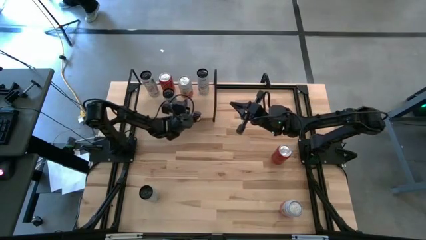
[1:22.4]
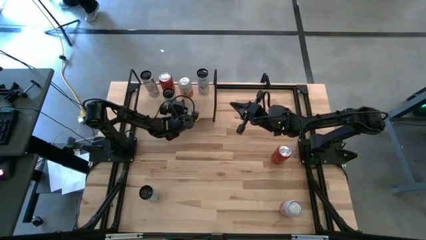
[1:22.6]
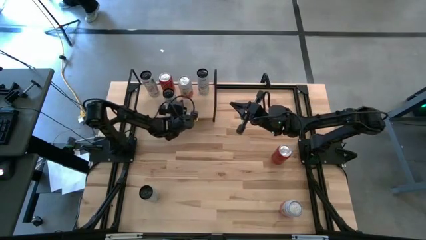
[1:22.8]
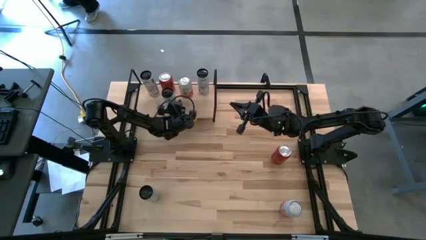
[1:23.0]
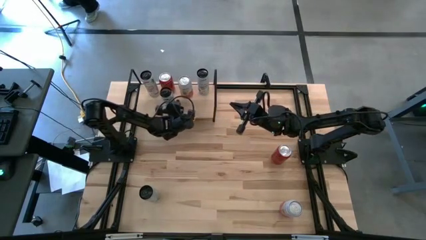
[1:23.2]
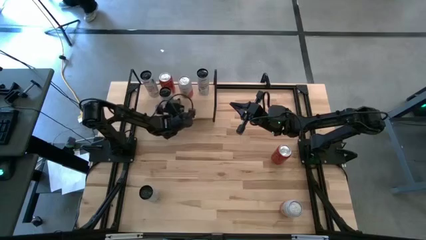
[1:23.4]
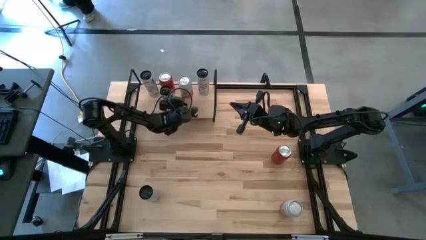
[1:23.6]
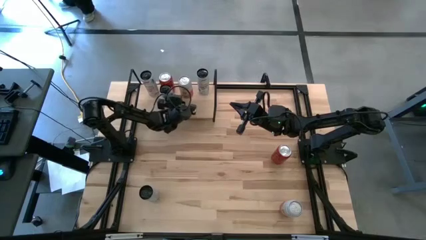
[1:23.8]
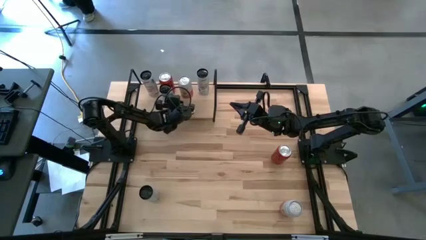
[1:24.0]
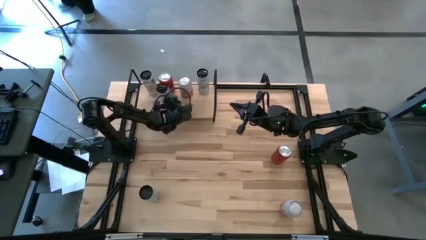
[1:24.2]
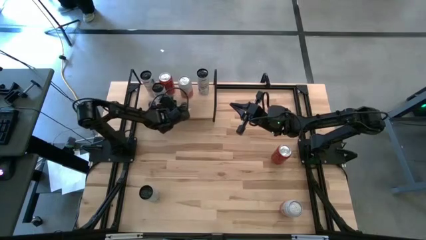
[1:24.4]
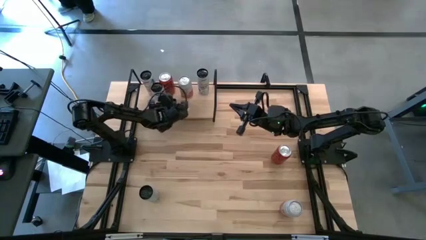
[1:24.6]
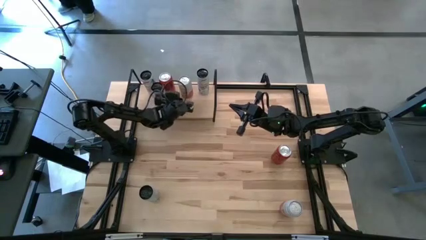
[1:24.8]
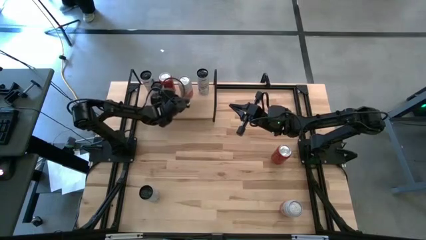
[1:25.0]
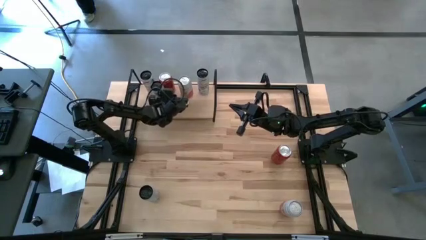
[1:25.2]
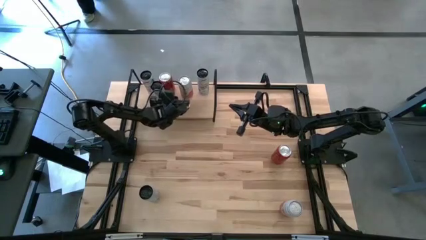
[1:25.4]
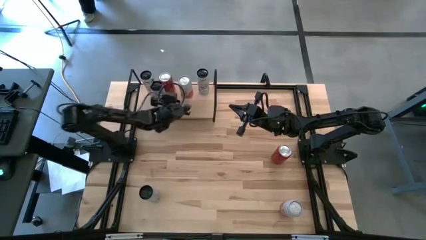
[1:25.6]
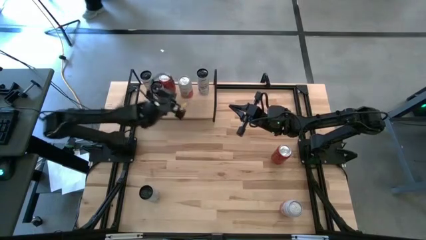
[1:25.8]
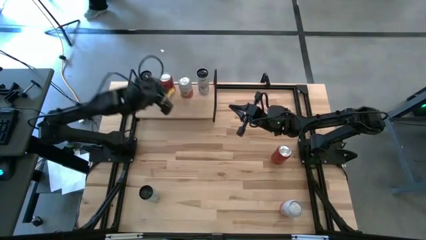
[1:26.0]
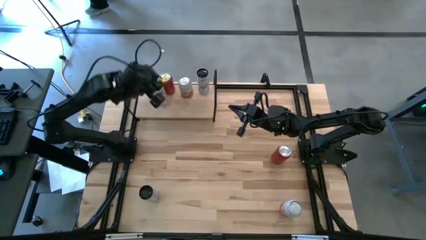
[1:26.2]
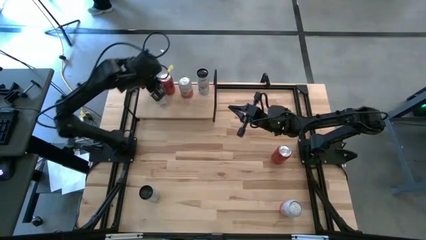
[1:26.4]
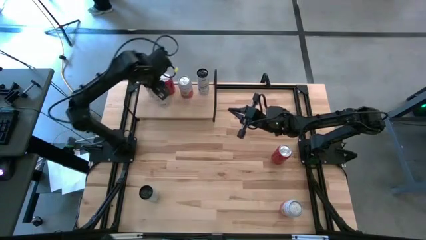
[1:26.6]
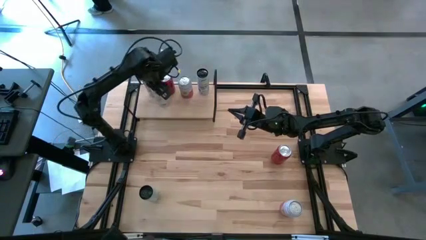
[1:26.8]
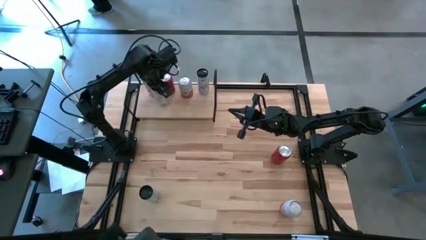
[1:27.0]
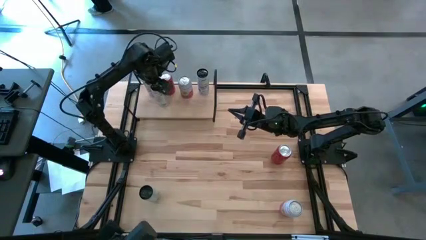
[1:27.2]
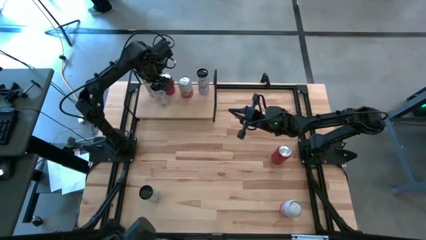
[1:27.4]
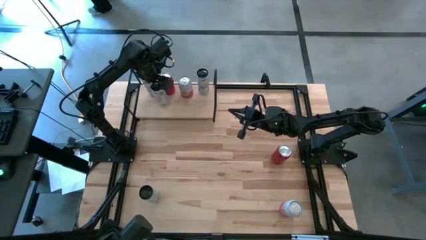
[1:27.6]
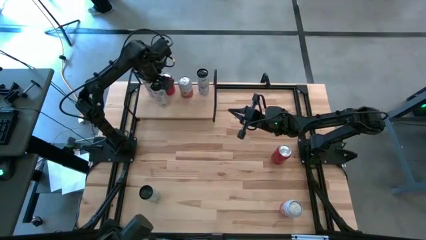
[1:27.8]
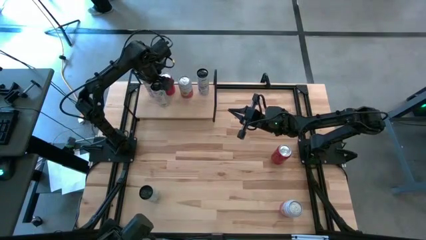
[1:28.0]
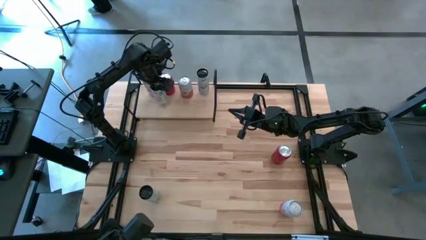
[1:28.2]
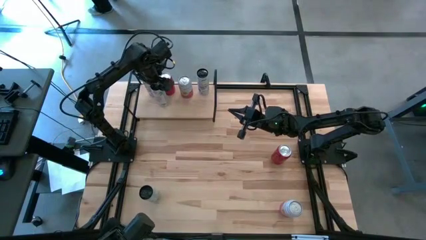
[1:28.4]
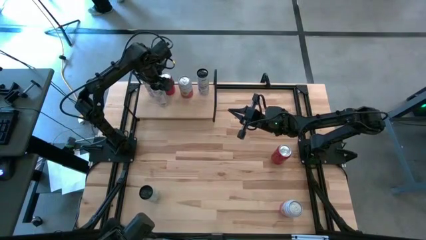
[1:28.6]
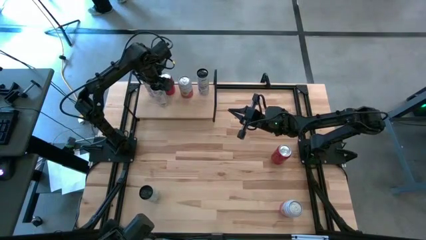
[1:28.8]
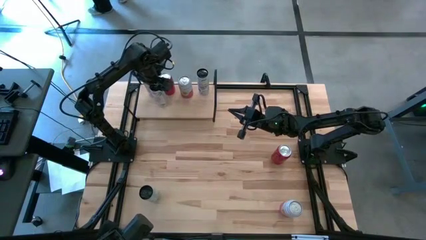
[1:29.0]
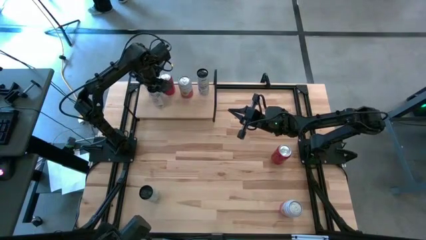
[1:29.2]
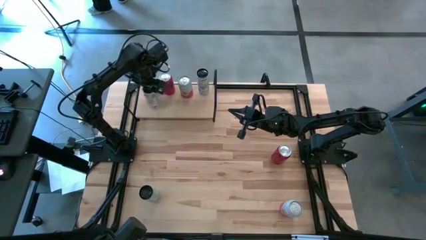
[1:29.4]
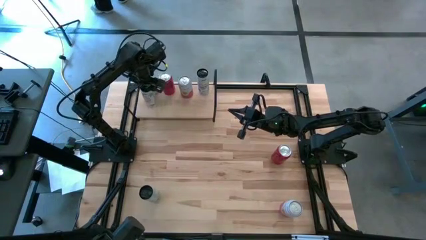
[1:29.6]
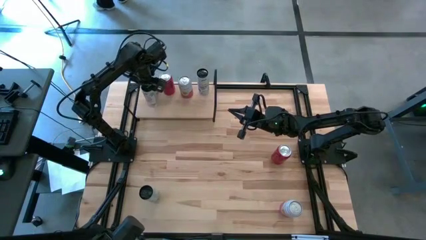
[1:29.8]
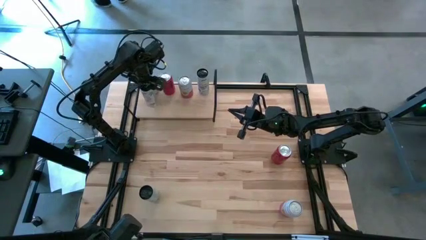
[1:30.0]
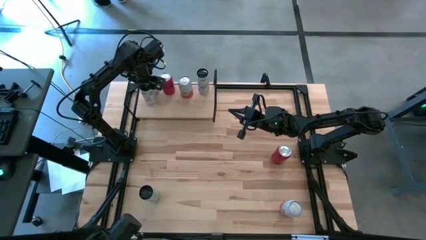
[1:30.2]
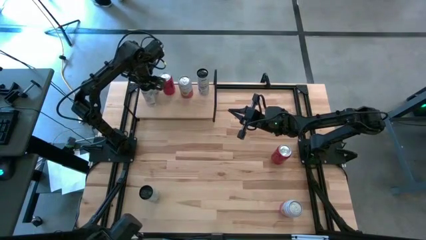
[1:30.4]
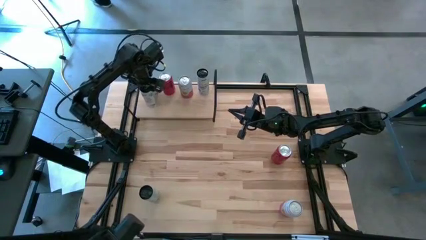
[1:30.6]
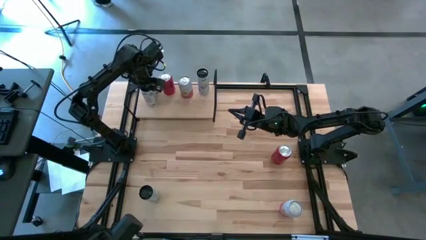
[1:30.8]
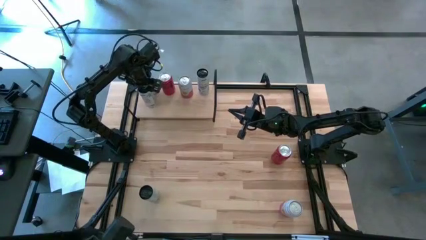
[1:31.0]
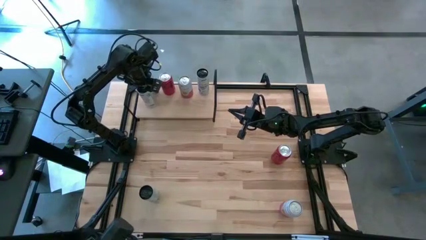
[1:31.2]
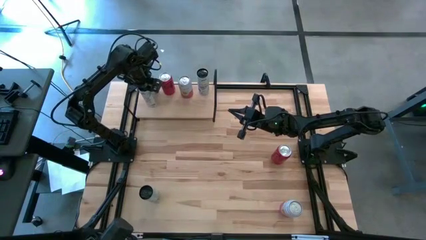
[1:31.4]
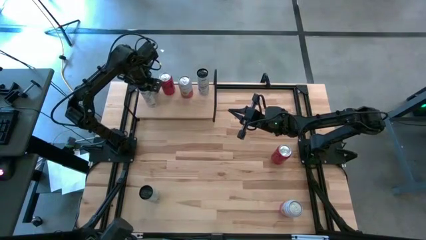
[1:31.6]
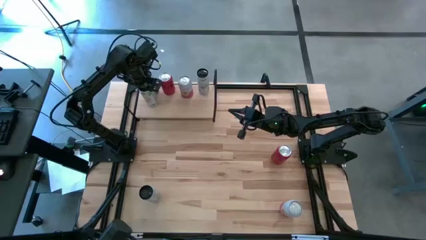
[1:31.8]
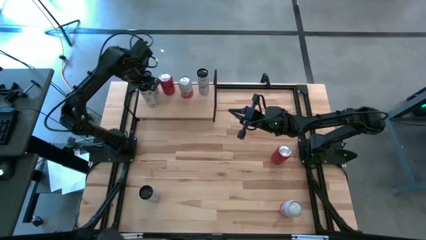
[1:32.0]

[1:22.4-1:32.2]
Task: Place canned beverage on shelf
Put the white-pink soda can on the shelf aligned with the other white-pink soda can

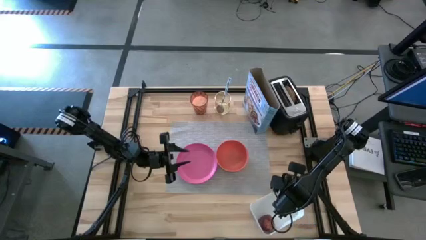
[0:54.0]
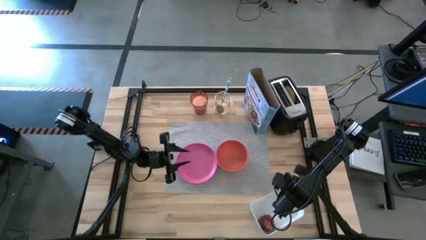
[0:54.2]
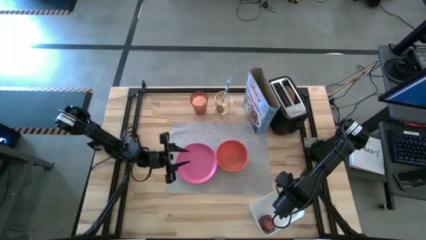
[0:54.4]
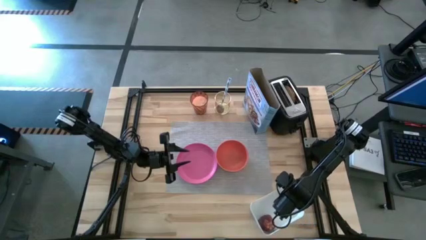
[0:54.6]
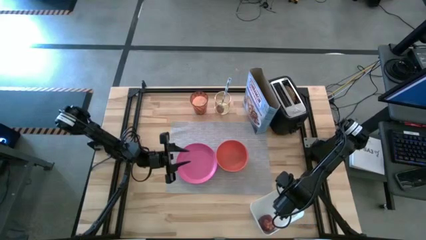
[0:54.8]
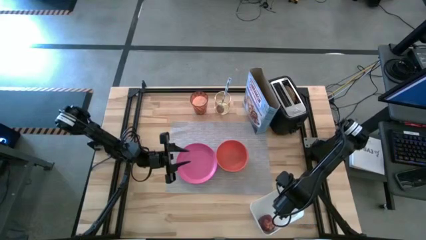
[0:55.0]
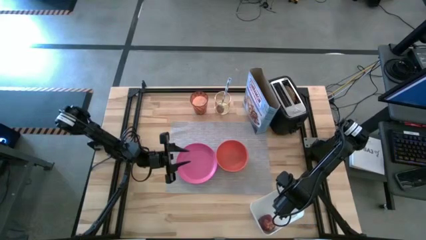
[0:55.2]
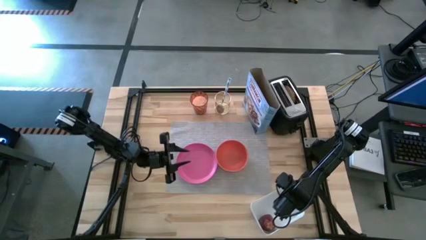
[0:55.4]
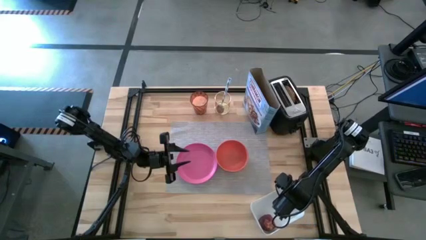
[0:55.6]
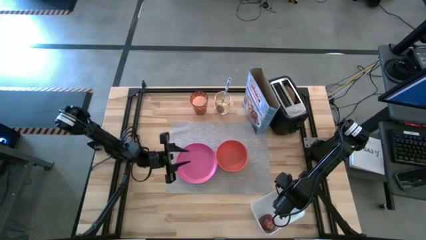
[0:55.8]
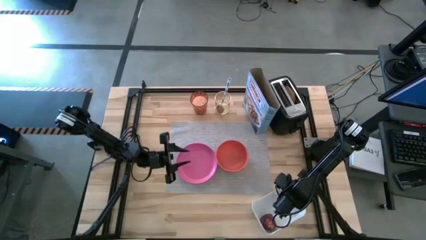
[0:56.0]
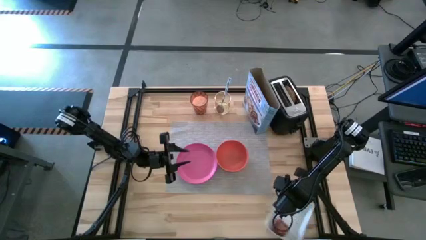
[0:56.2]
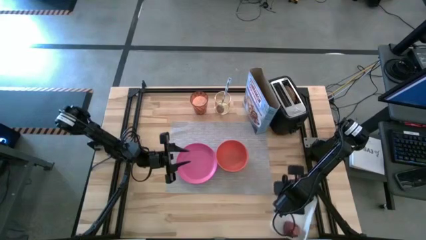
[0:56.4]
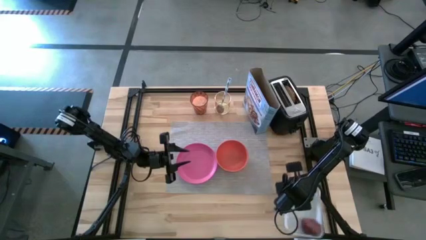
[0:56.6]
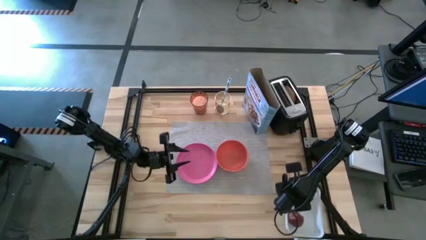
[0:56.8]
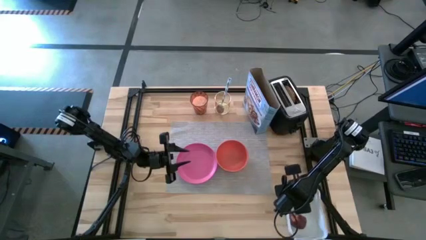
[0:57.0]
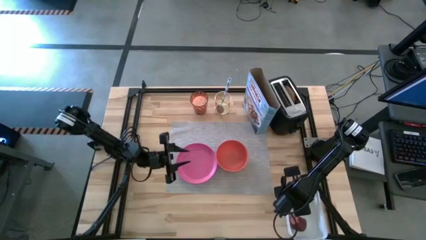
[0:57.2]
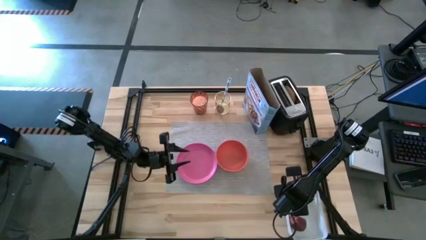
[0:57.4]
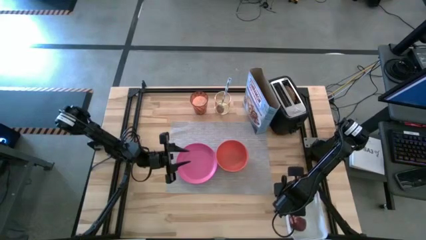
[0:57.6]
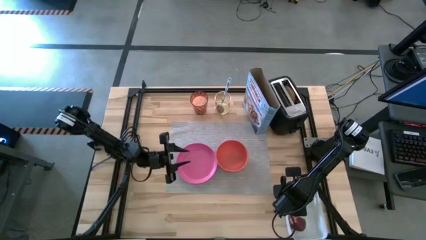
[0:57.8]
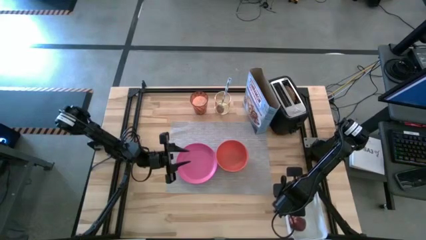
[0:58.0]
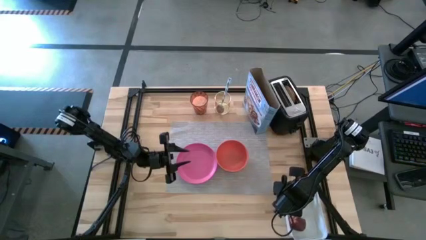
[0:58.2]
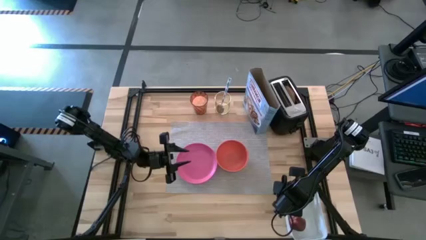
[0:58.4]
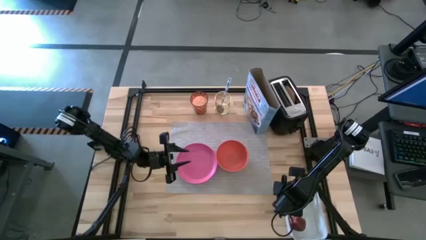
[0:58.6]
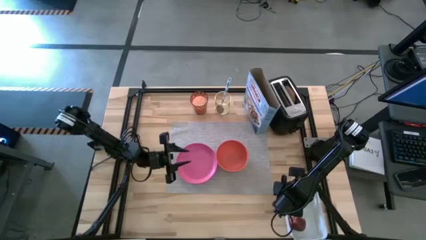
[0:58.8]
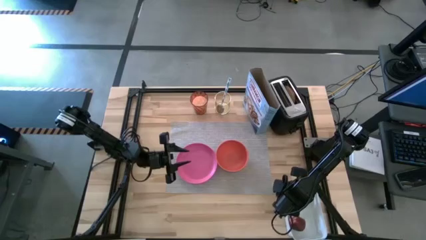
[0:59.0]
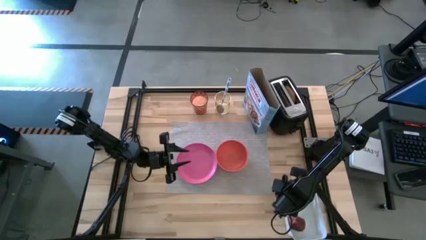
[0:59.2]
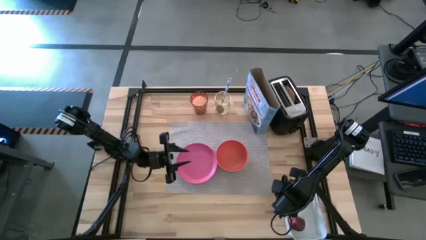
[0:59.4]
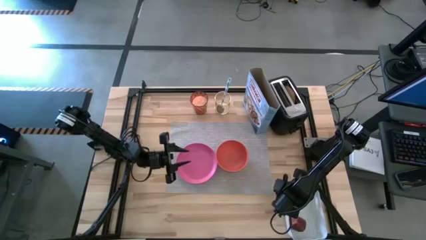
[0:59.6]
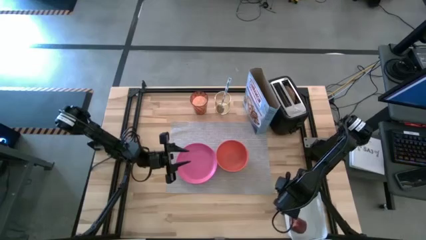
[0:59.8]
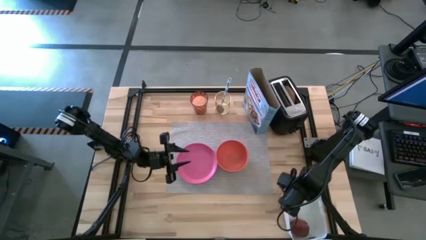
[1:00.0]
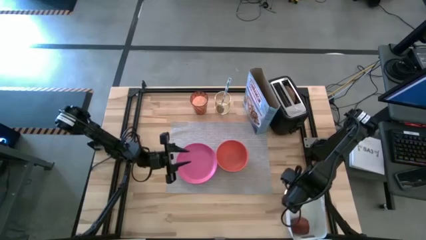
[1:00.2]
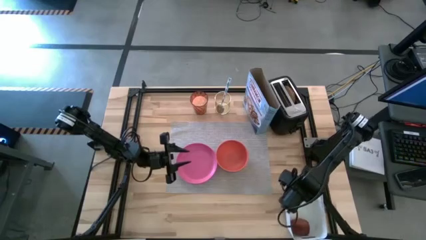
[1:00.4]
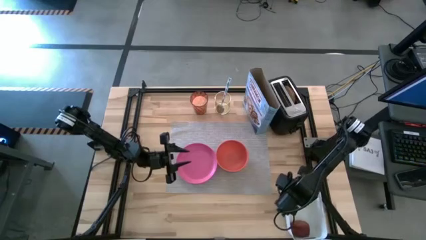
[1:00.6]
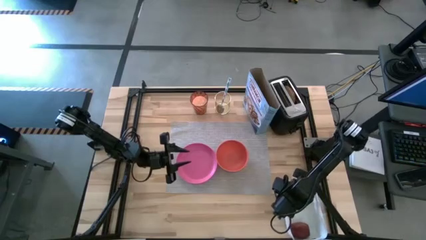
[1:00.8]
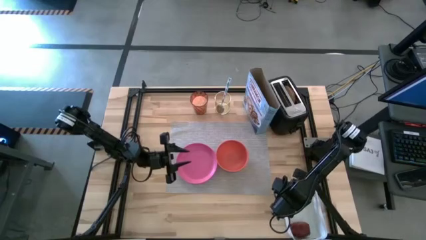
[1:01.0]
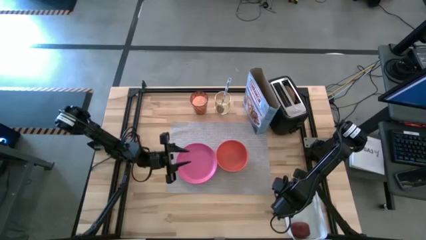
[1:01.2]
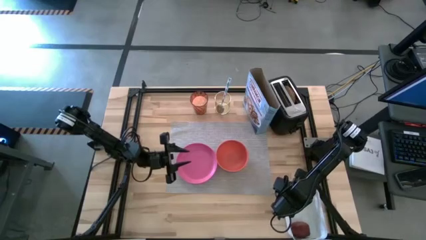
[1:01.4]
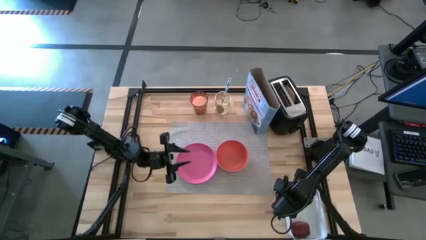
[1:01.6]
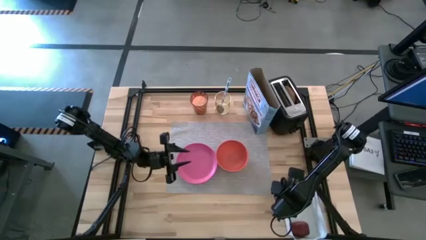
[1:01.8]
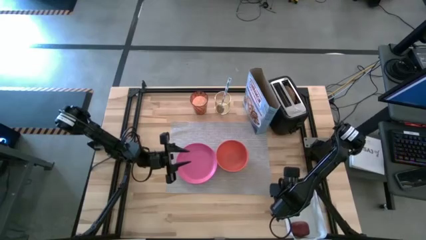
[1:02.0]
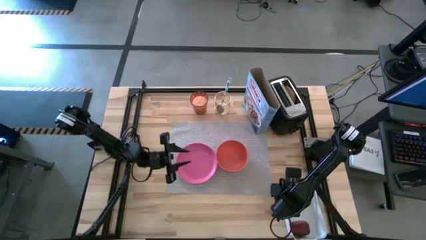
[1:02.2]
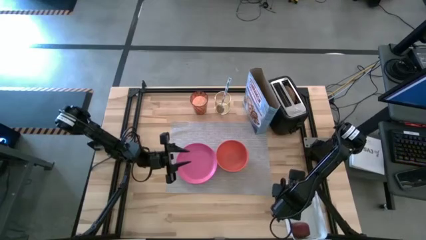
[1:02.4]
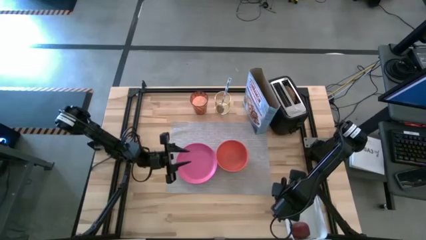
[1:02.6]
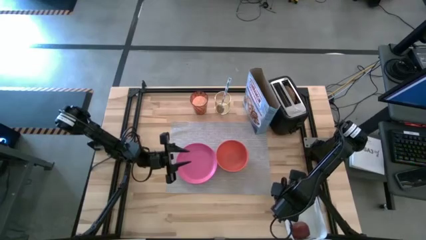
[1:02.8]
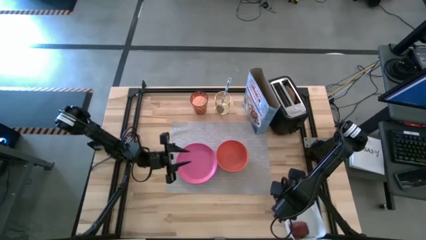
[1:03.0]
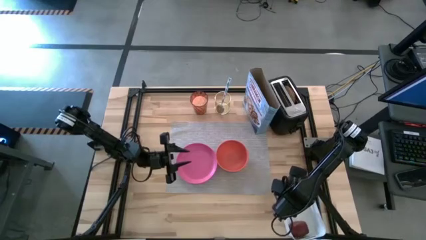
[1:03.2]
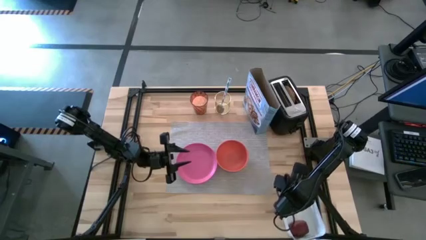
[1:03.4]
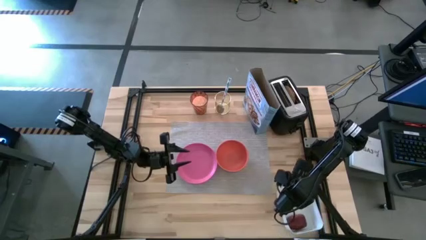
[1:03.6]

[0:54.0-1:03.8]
Task: Arrange a breakfast setting
Move the white bin to the bottom right of the table
